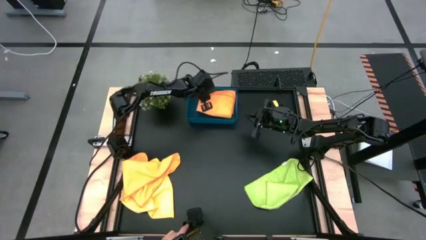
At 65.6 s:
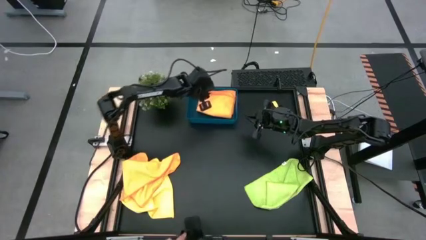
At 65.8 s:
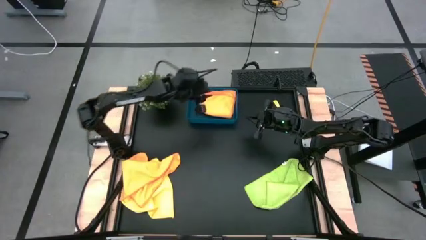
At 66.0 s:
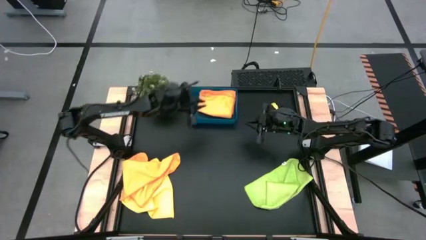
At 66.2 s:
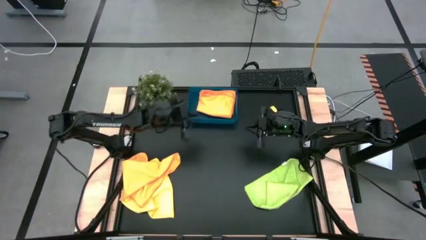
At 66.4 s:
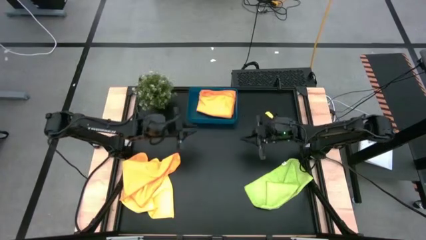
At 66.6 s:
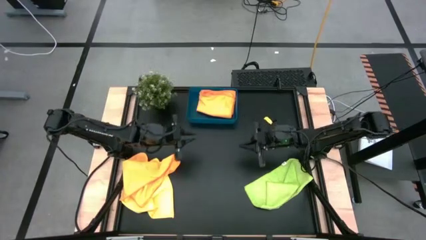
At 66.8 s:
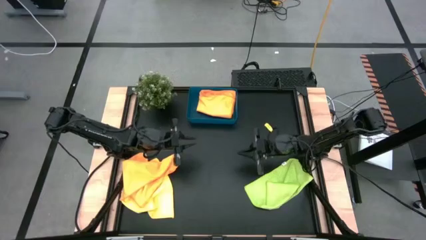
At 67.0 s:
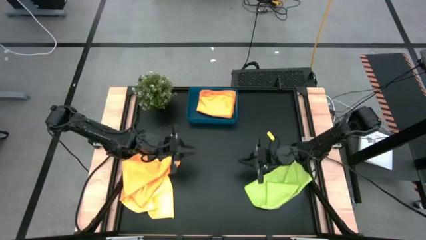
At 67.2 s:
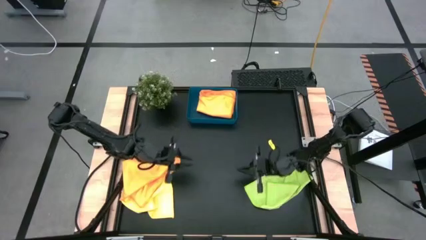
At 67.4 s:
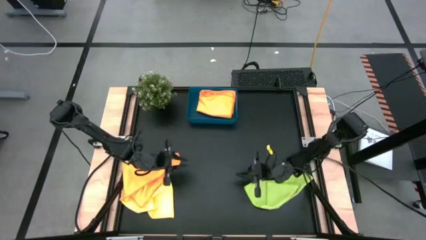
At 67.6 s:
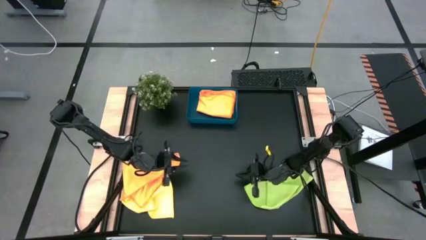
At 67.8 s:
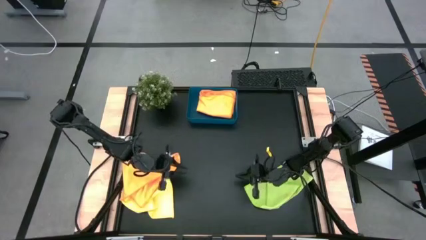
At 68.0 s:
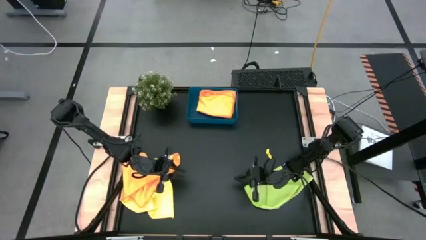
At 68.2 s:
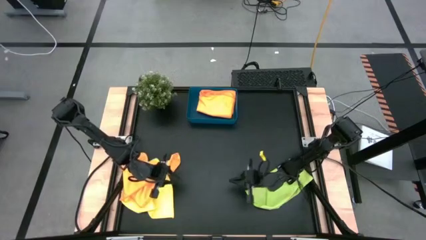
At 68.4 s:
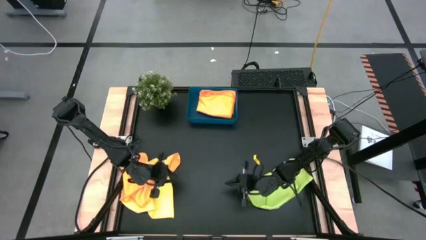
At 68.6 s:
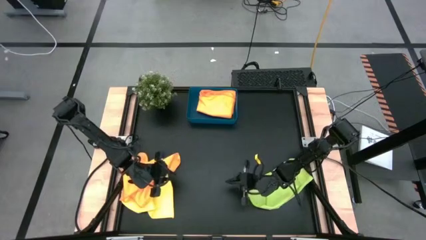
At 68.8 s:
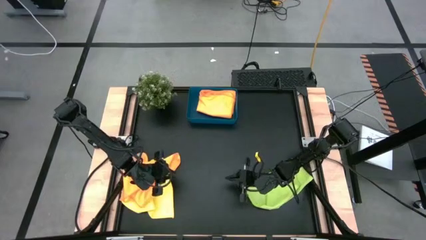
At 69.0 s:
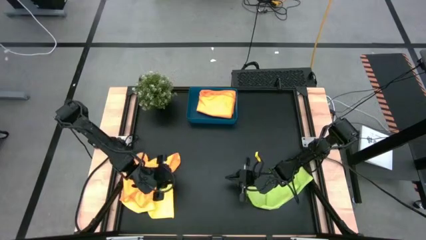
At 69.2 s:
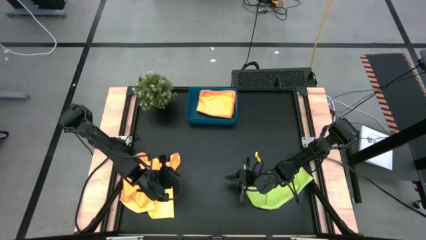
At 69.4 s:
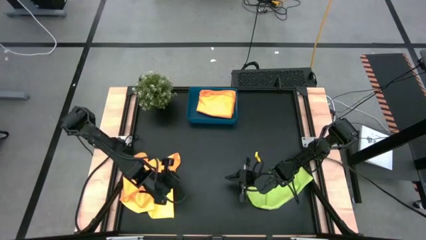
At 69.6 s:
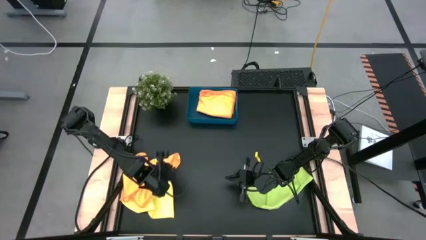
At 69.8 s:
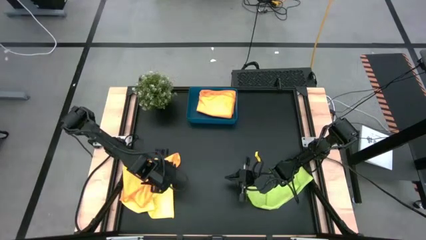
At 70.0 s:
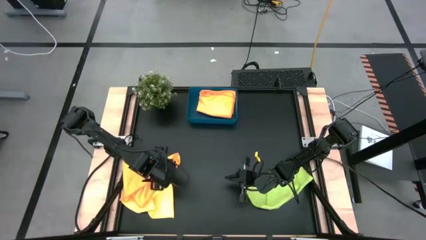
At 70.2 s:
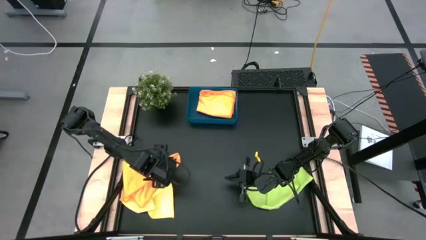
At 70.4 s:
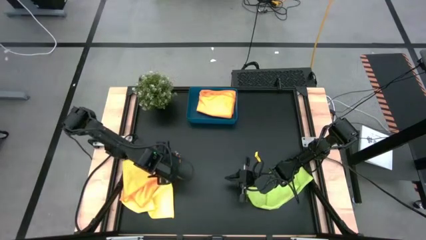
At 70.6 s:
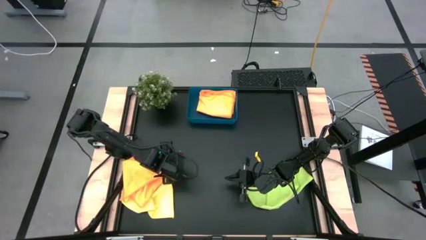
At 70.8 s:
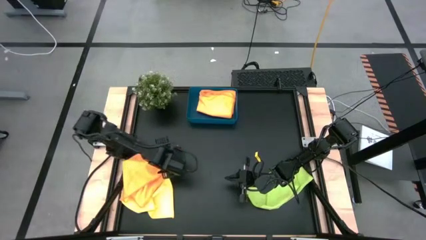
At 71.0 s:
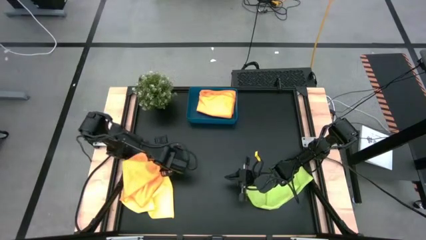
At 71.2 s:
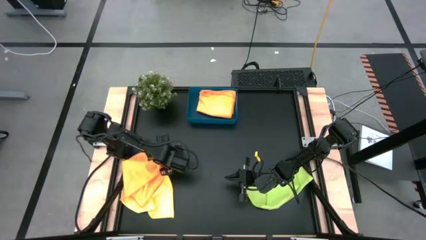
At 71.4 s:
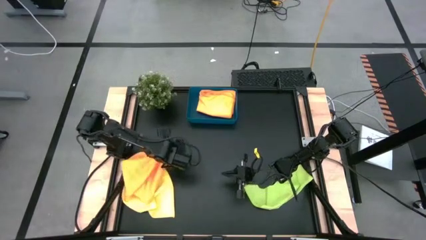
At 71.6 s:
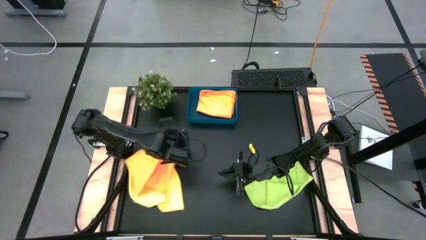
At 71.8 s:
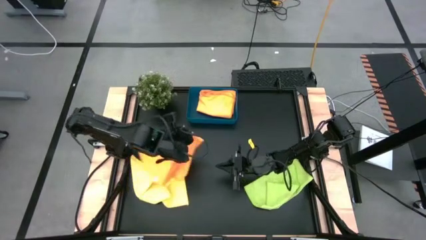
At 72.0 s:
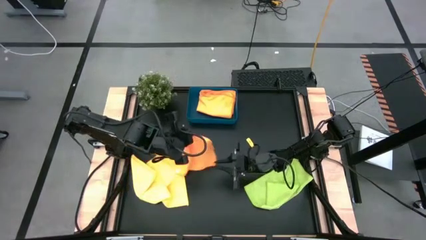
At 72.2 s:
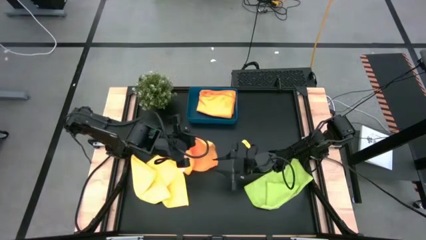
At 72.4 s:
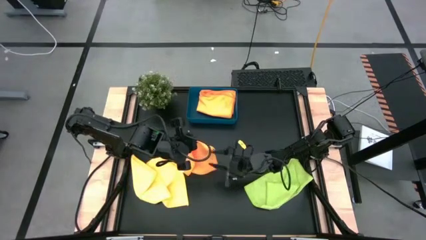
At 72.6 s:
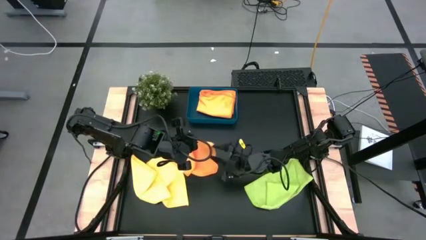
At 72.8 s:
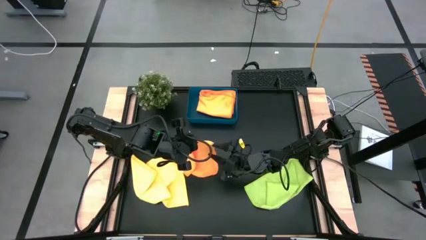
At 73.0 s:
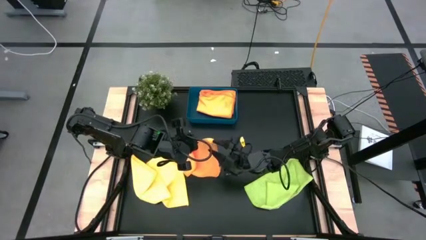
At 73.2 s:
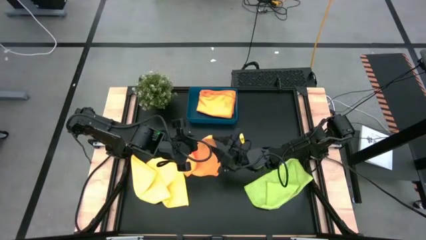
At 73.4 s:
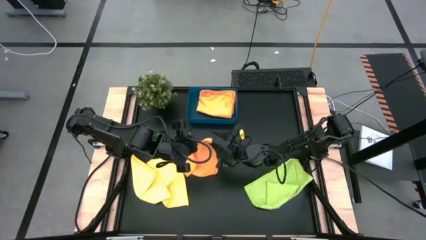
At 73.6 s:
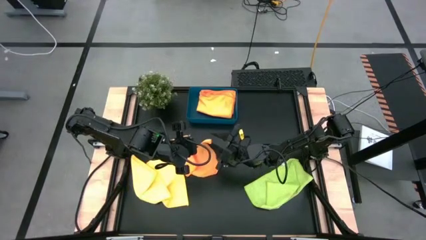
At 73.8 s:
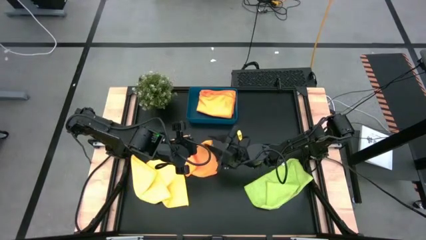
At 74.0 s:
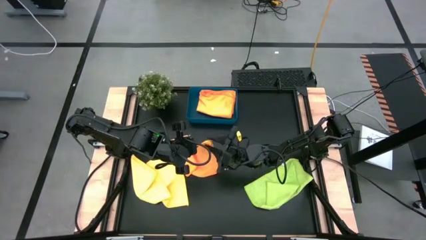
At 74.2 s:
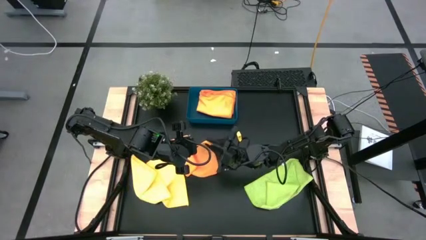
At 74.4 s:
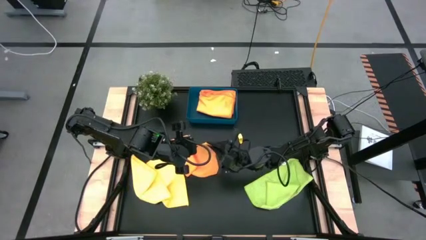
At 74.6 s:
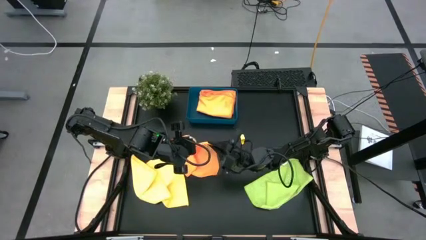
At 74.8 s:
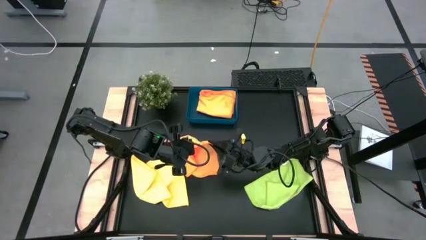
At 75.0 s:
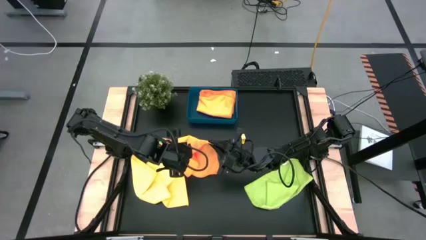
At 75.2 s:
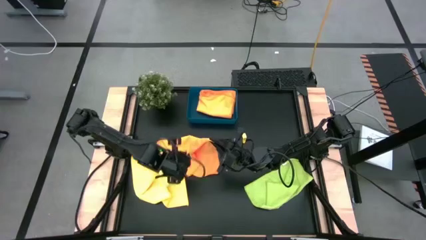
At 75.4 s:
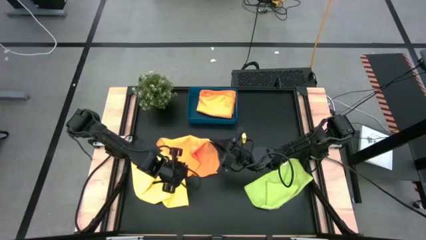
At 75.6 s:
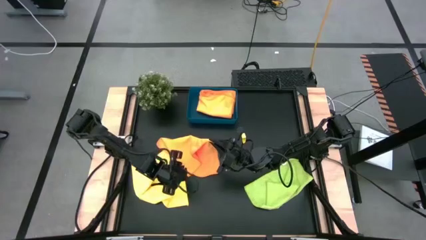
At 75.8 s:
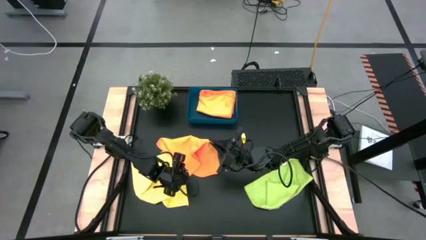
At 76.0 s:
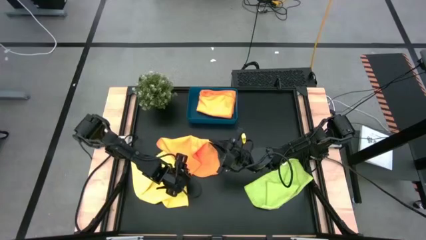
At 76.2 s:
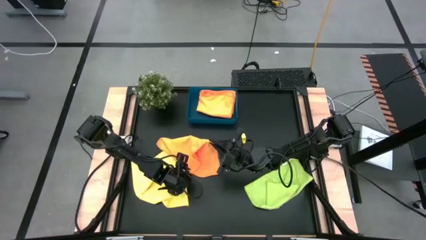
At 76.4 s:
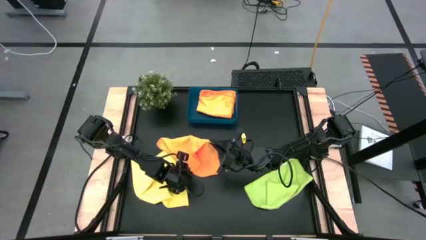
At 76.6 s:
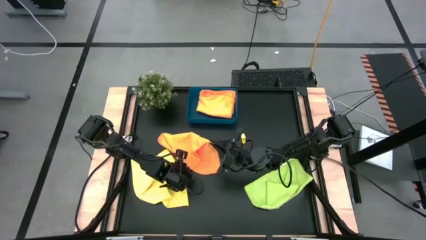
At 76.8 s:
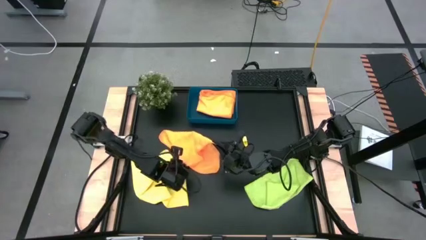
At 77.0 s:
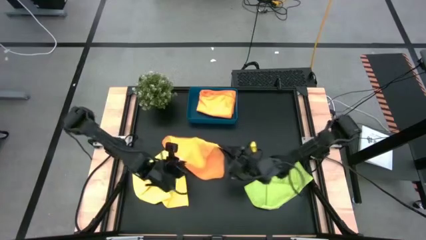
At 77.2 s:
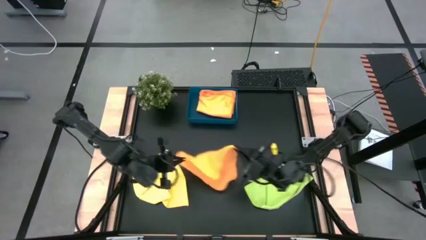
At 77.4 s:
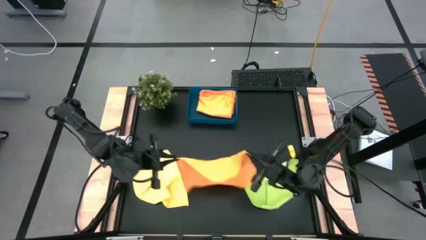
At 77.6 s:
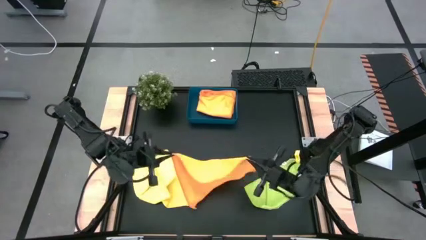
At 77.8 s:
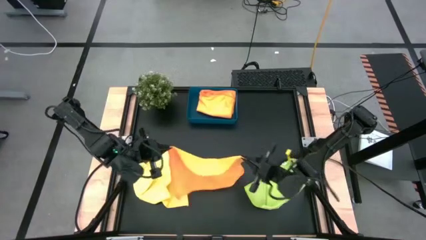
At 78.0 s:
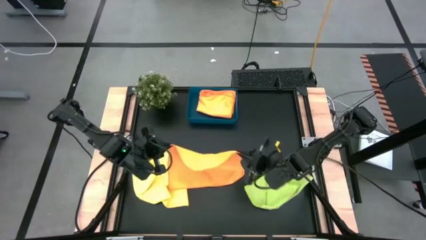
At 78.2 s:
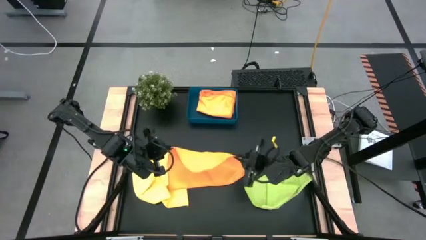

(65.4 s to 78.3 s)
Task: Fold microfiber towels
Fold the orange microfiber towel

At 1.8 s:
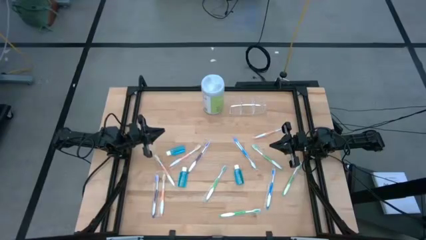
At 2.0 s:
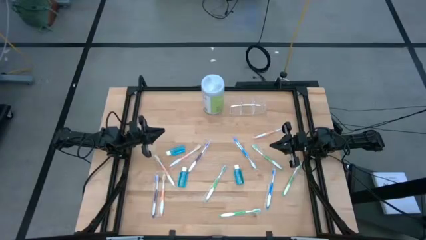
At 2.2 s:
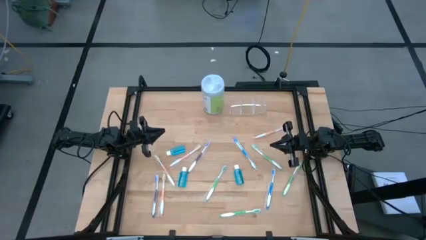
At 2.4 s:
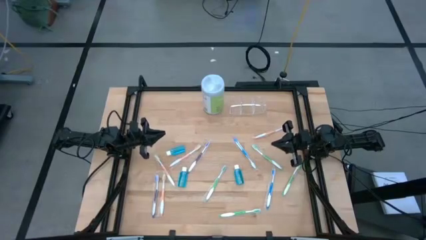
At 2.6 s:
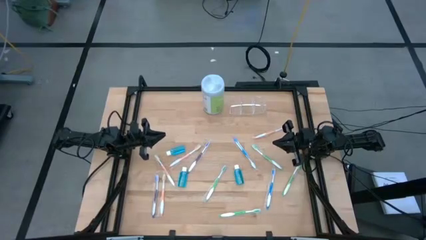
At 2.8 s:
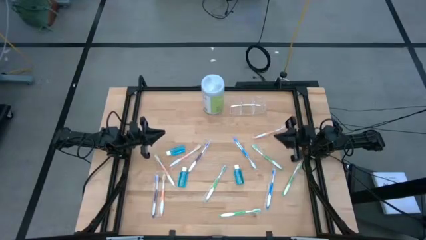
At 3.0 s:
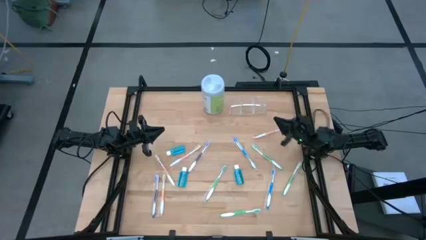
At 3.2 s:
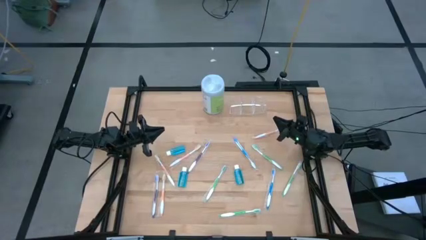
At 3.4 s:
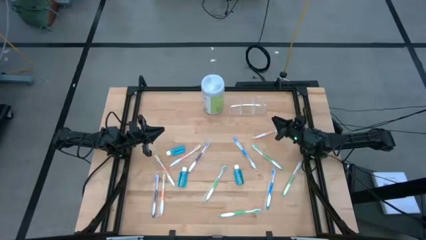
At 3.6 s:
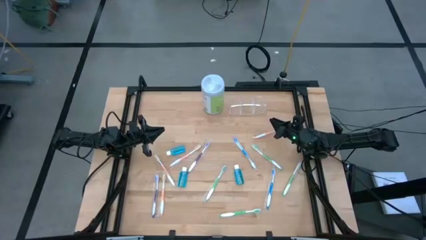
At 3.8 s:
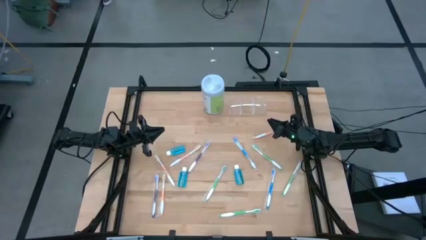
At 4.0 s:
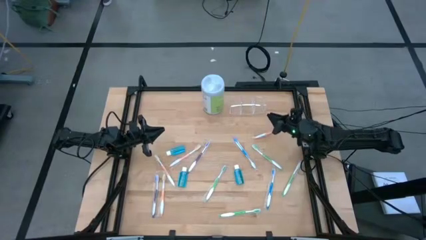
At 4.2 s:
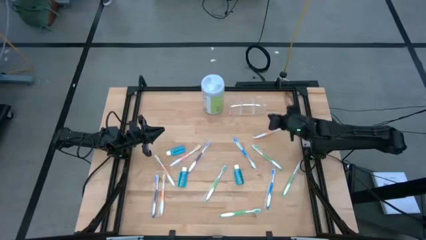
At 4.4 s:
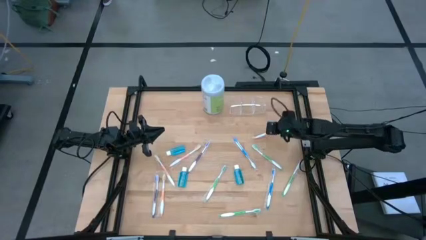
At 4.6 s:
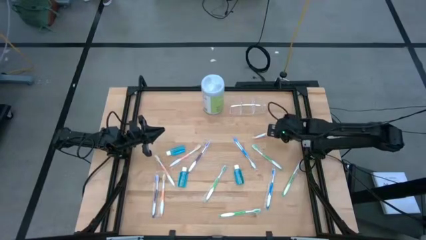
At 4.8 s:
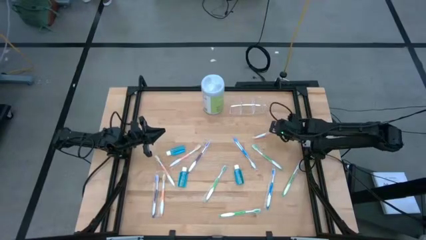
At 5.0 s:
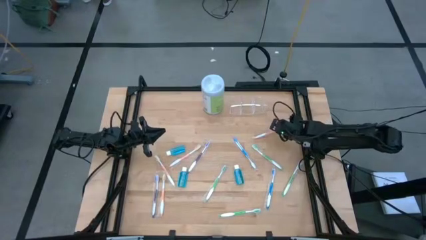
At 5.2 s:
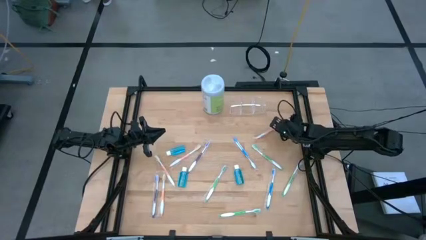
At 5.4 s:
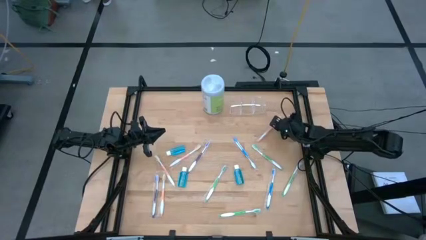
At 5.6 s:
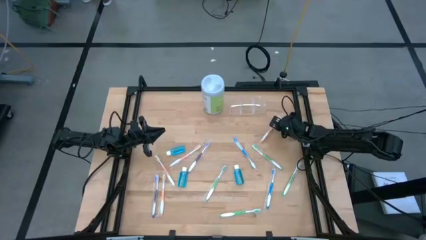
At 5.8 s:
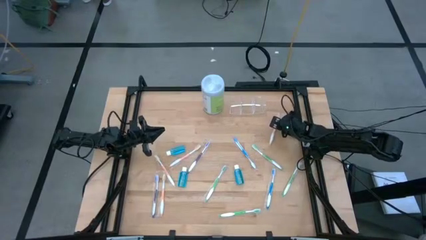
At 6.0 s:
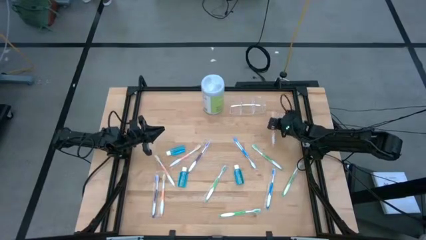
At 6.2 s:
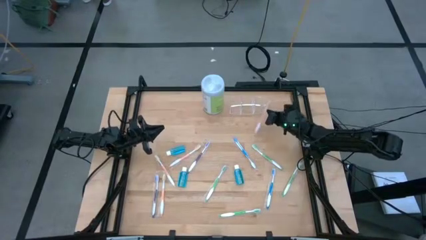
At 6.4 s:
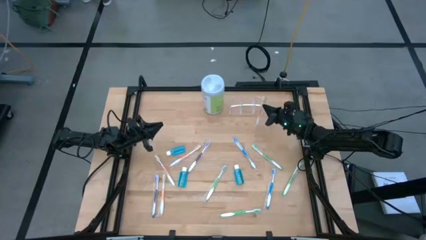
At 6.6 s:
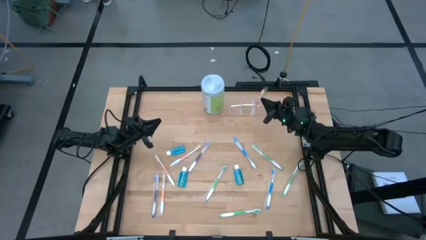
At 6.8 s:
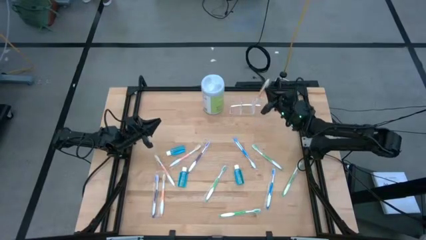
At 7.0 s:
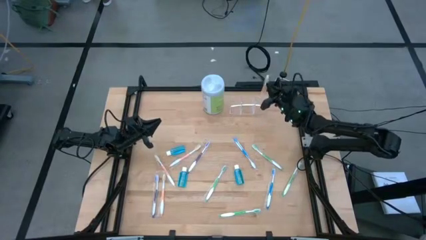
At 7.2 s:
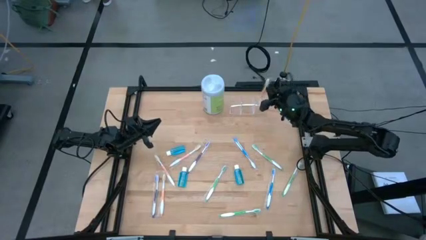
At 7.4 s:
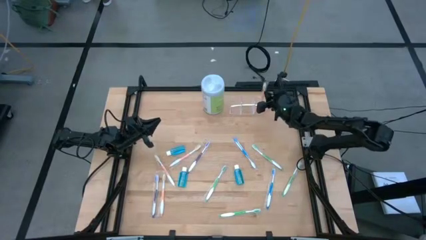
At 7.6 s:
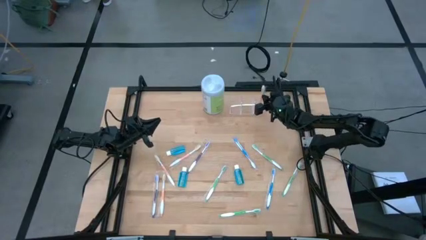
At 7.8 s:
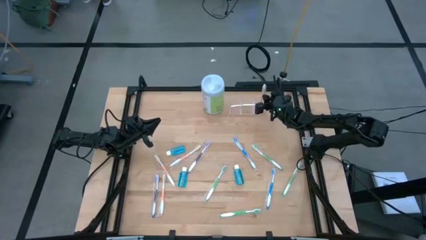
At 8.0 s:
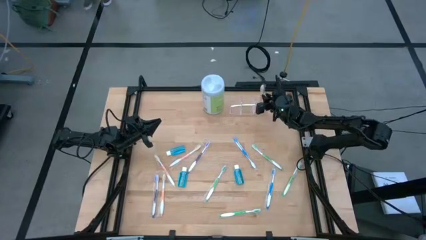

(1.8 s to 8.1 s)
Task: Pick & Place toothbrushing station
Put the orange toothbrush into the transparent organizer
